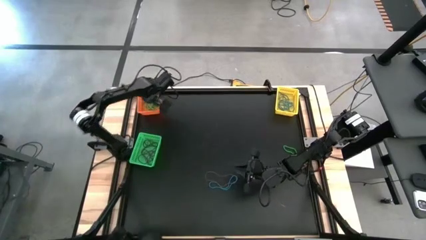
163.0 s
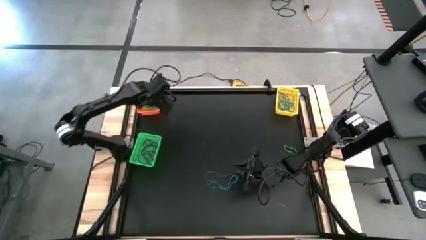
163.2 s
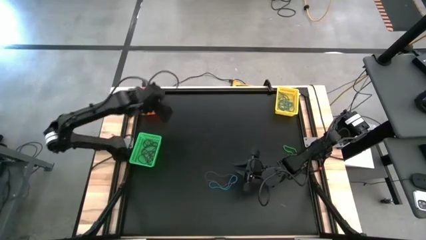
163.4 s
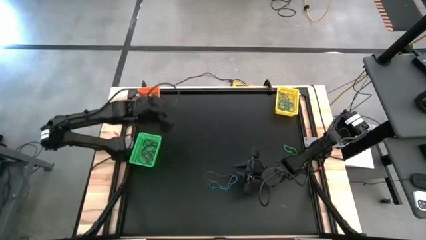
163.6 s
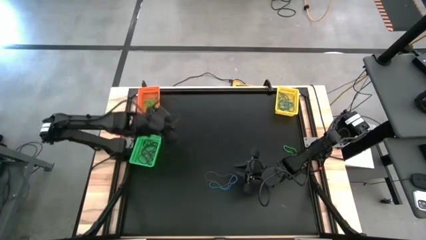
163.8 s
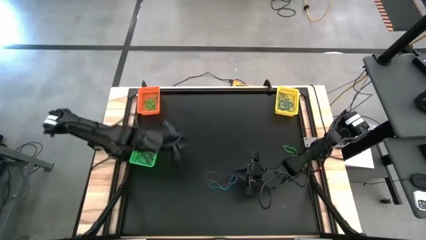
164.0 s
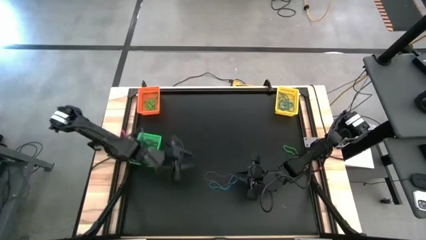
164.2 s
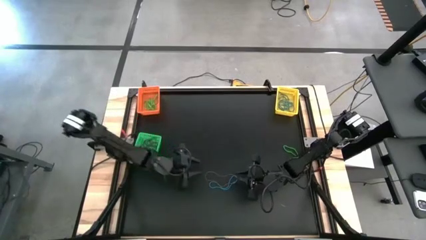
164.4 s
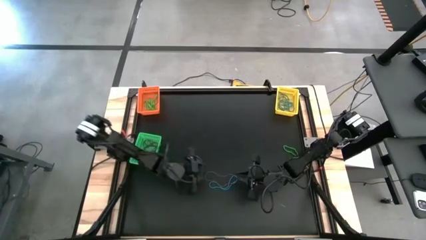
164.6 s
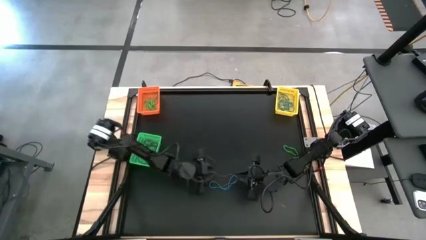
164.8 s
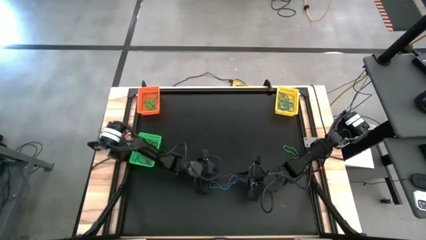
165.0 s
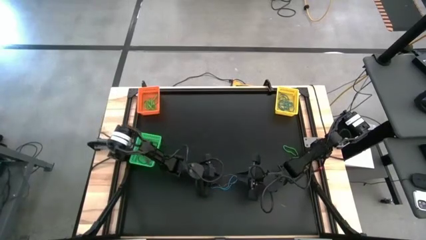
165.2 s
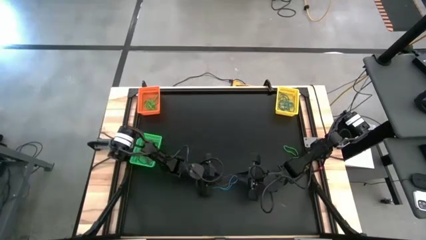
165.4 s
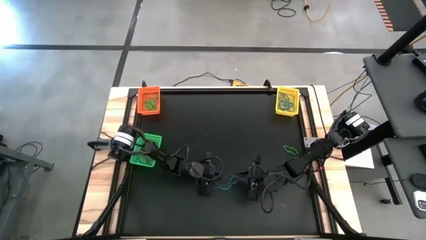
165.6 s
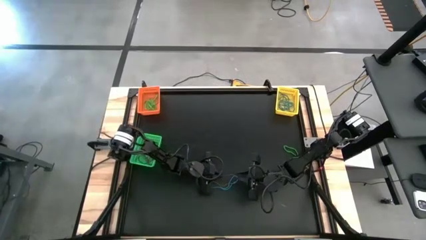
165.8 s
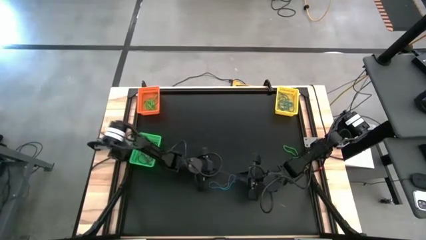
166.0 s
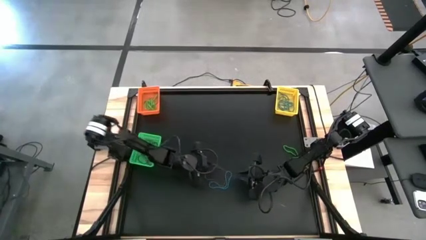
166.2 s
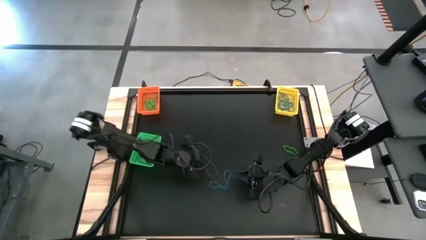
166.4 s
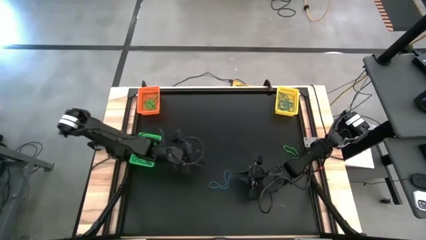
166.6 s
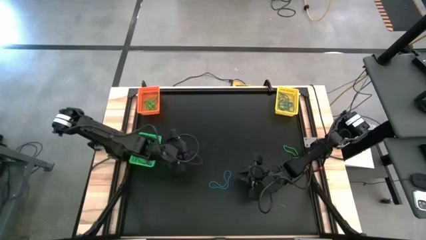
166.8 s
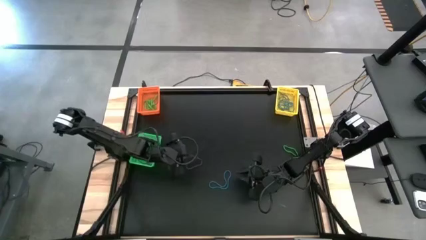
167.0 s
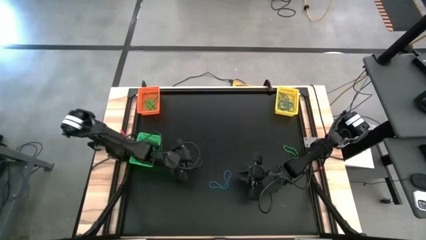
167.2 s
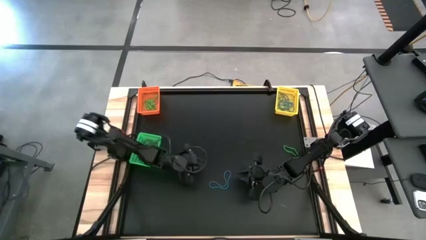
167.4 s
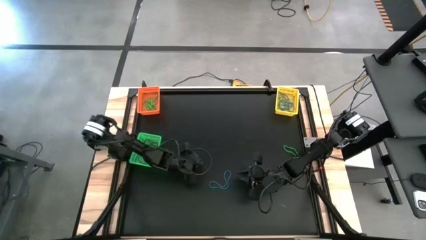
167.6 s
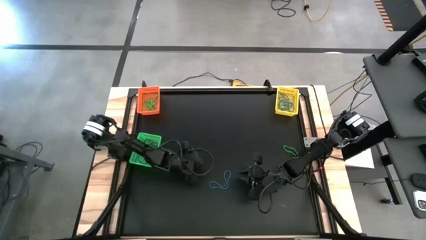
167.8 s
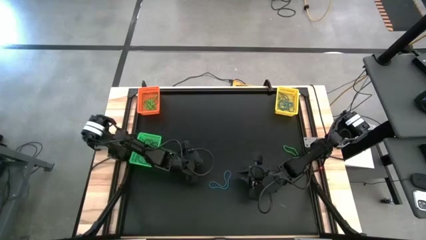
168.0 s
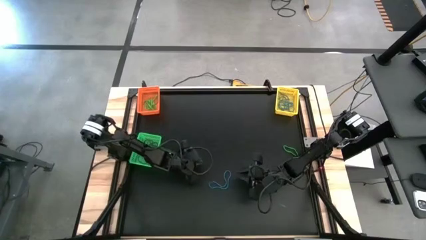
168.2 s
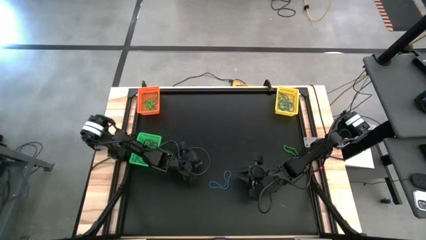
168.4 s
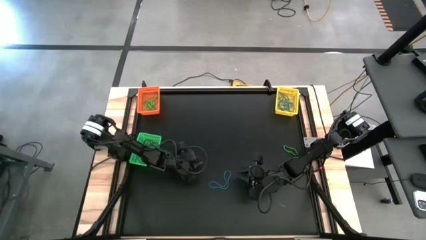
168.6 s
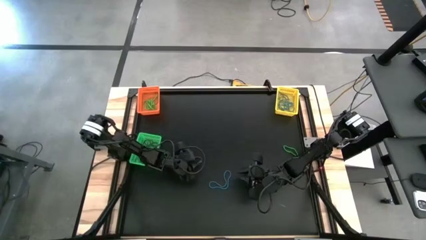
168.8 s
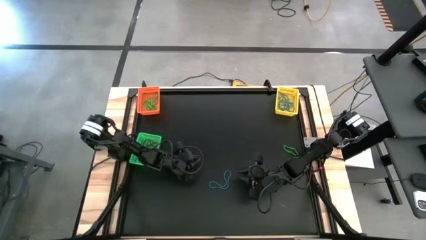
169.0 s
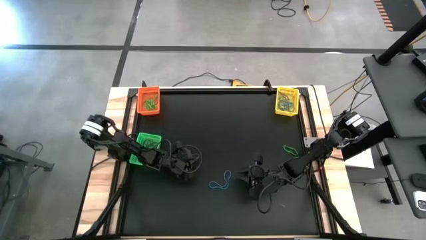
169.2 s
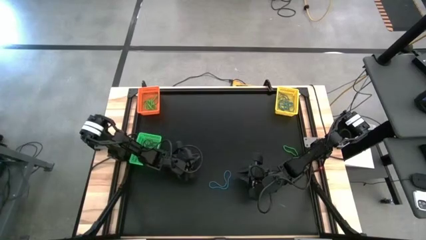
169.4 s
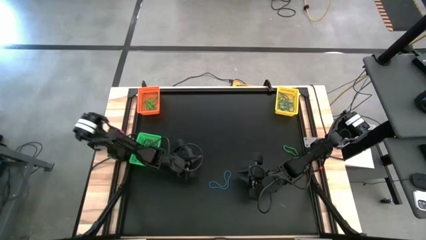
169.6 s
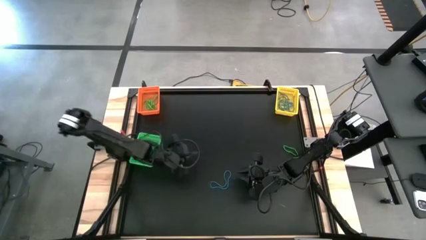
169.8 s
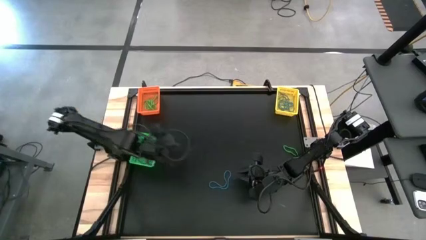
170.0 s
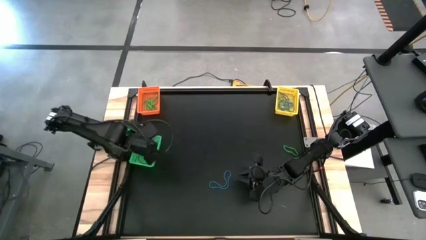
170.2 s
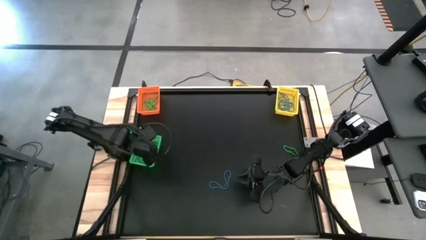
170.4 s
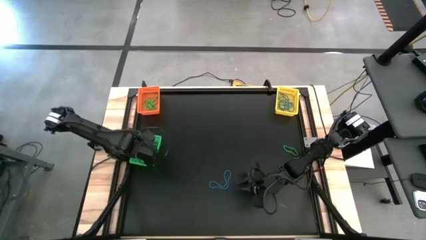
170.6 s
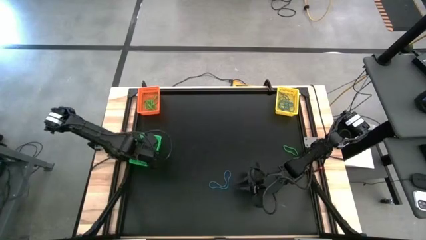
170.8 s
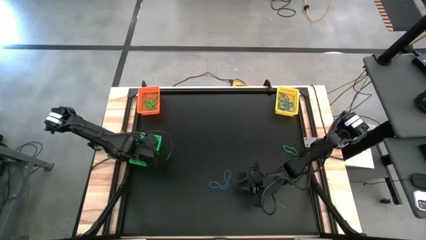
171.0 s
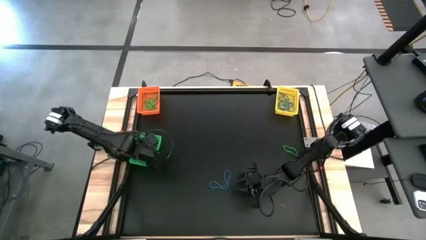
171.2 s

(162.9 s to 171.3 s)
Task: Sort rubber bands into baskets
Put the violet rubber band into the green bin

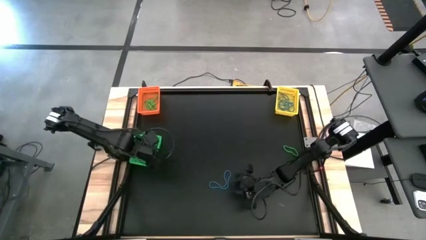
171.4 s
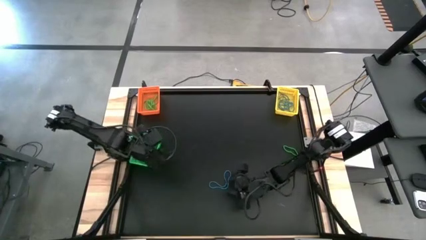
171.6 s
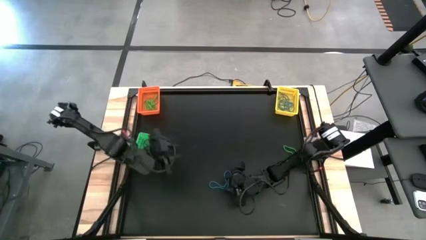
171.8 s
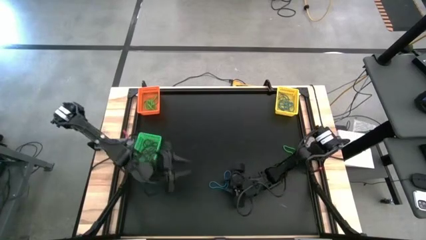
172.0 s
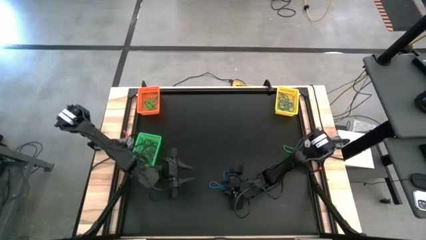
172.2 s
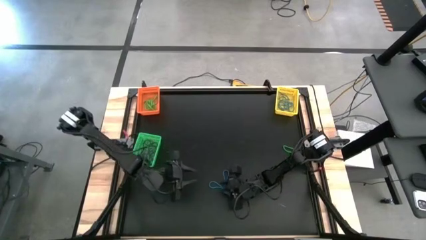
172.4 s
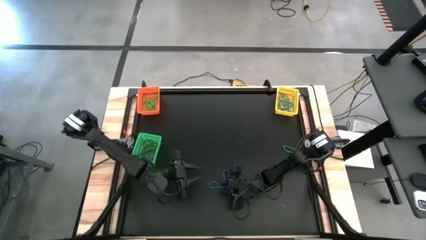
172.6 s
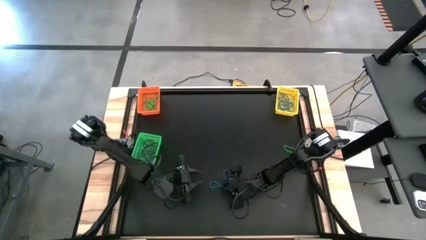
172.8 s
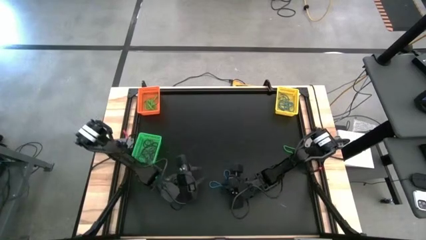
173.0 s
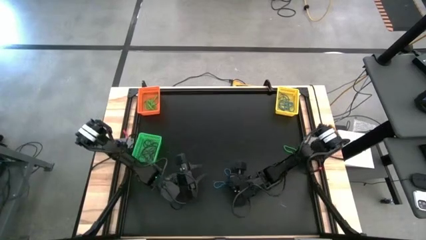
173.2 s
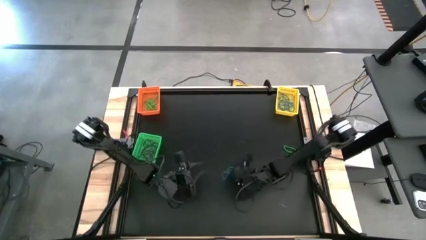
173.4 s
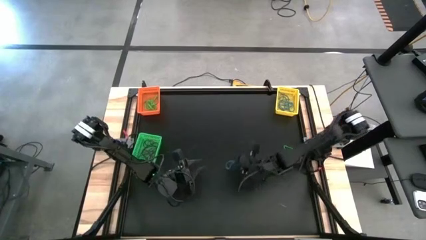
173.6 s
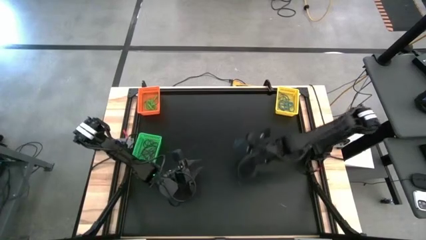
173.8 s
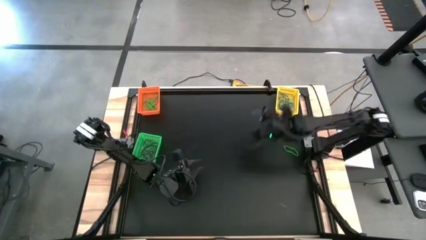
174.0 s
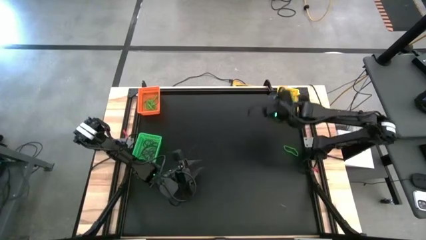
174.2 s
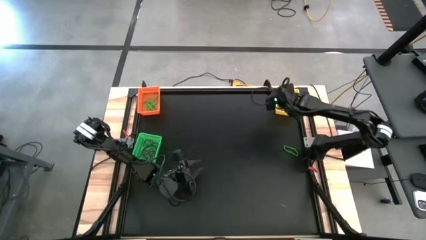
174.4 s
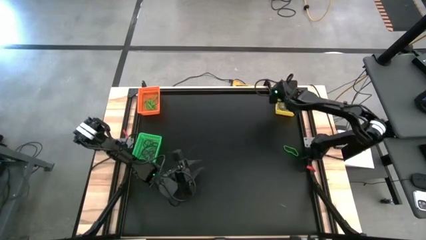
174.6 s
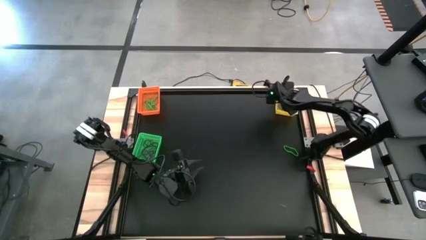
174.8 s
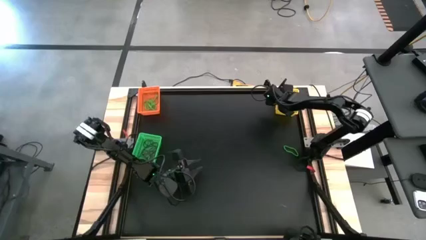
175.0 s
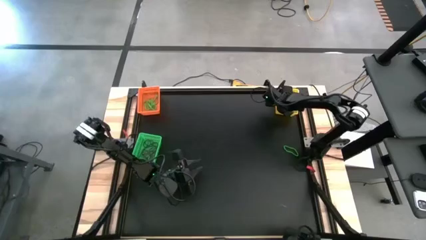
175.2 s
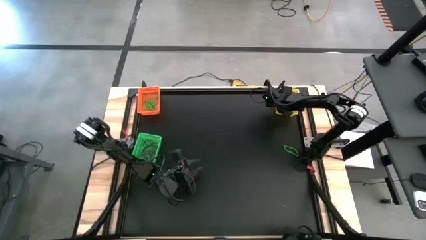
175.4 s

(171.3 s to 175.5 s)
Put the blue rubber band into the yellow bin

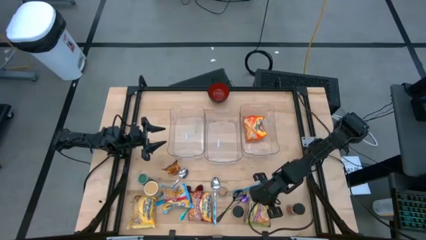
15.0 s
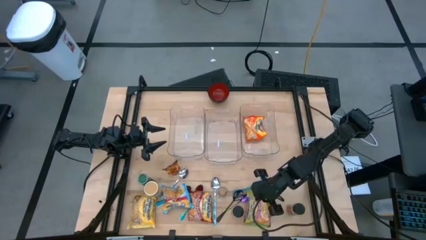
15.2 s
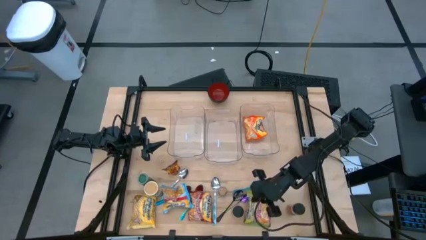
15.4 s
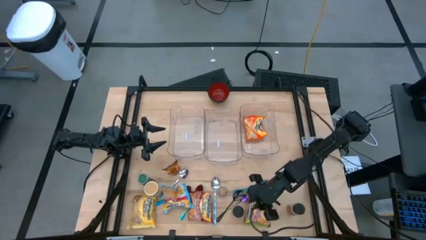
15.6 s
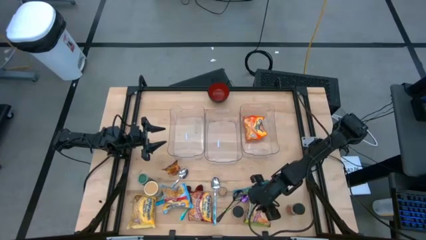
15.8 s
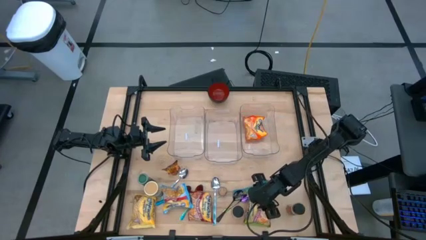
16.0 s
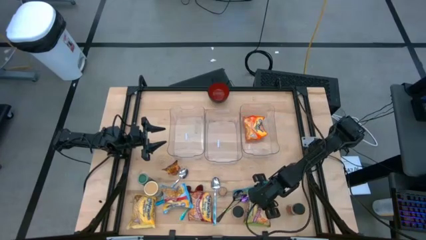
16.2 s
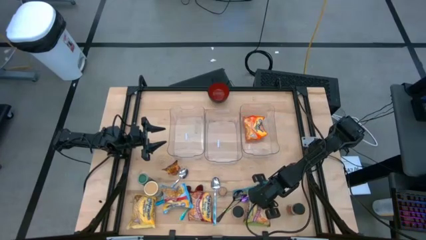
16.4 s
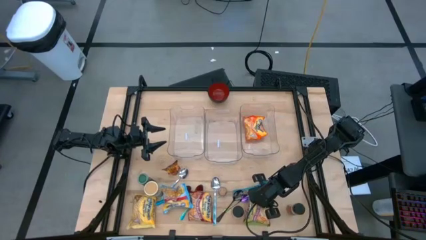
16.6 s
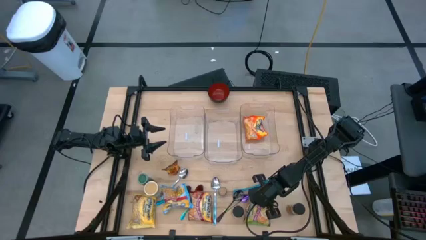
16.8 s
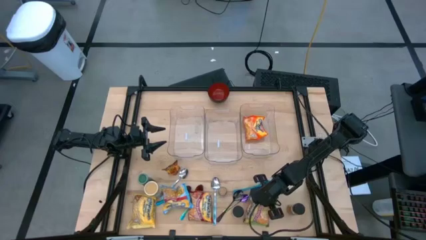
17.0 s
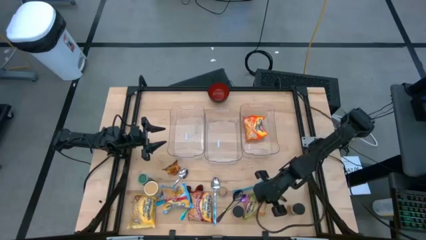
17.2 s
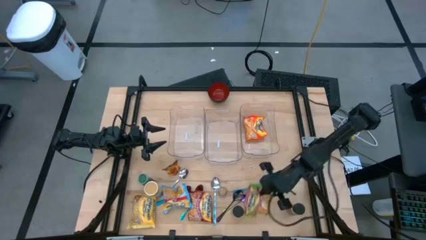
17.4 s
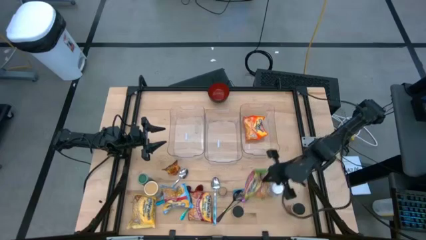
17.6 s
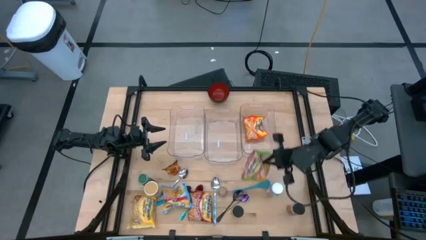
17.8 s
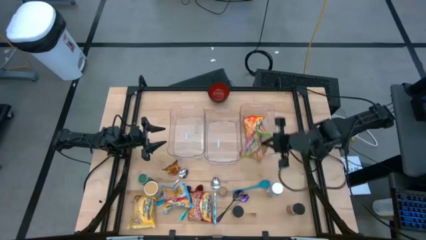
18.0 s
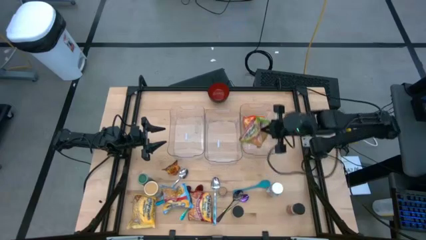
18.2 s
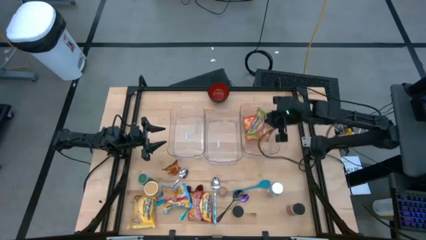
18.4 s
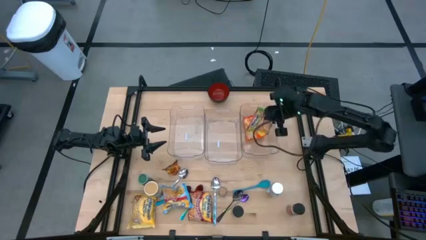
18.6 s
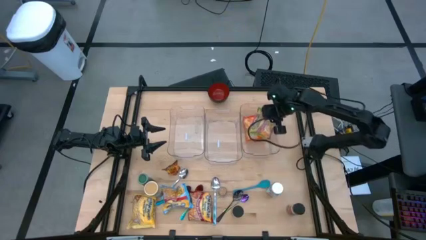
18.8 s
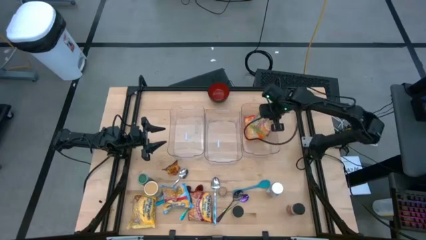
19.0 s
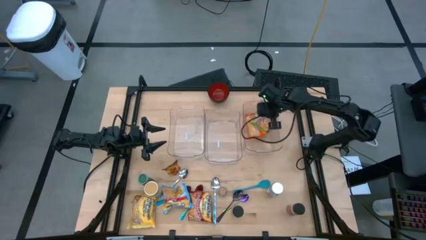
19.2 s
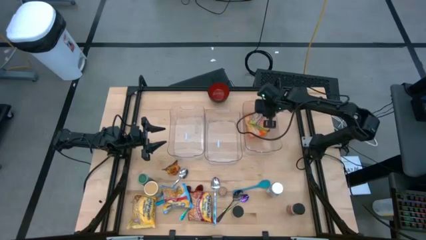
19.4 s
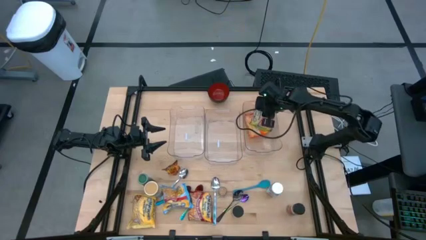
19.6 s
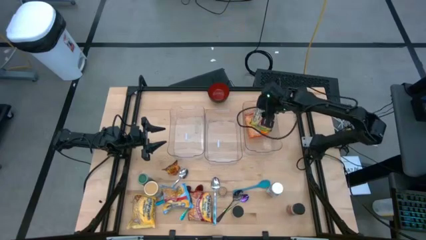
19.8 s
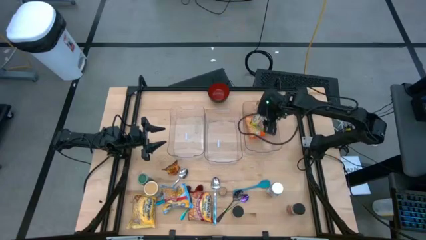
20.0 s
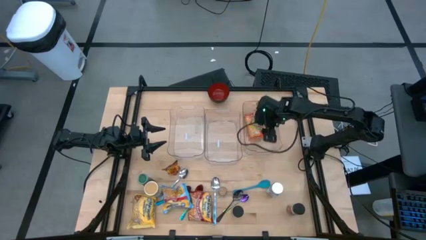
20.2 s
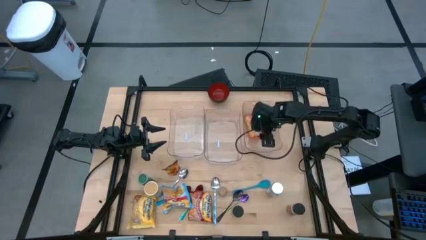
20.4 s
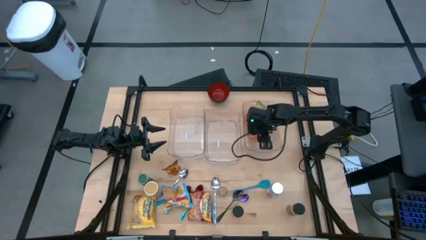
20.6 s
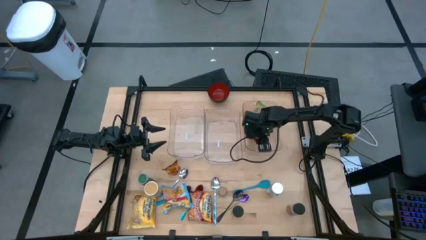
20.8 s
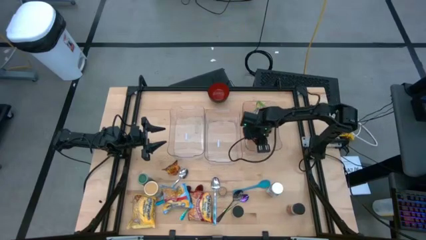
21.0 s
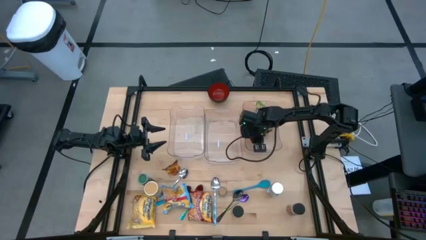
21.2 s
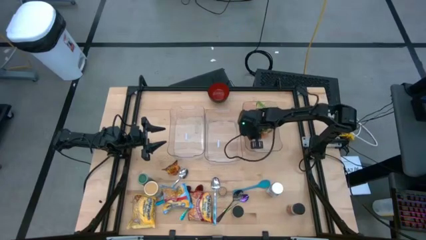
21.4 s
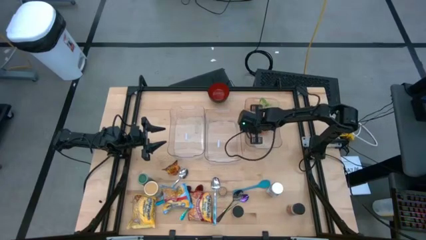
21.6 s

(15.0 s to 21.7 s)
Task: Pick & Place Food Item
Put the green noodle pack into the right transparent bin
